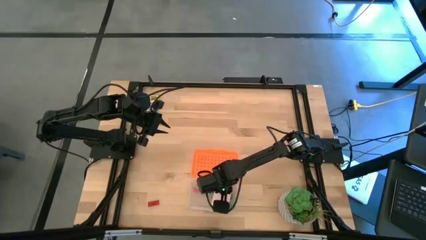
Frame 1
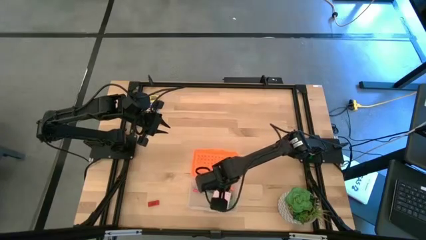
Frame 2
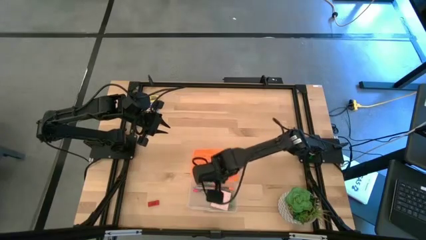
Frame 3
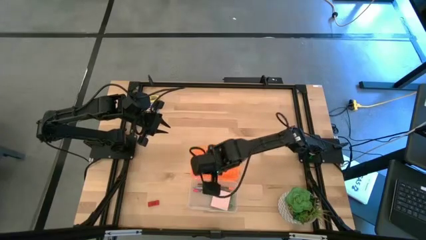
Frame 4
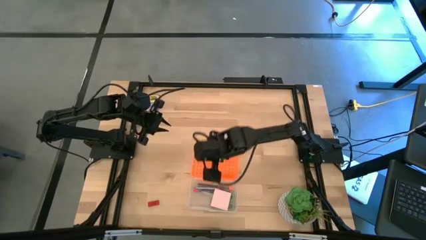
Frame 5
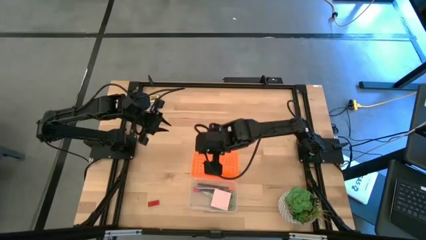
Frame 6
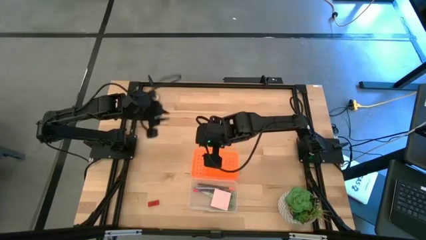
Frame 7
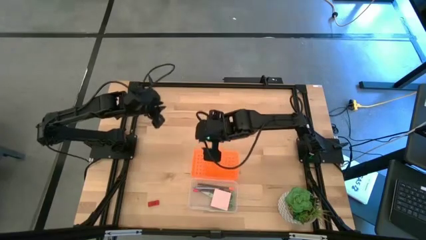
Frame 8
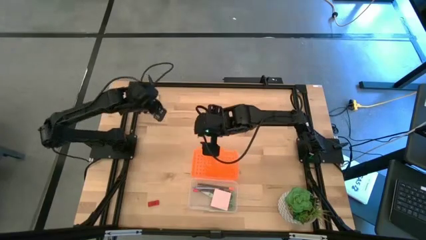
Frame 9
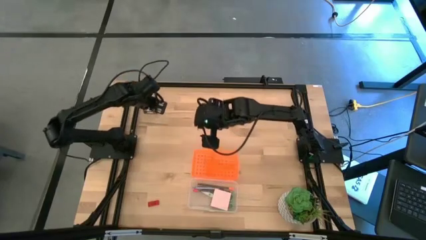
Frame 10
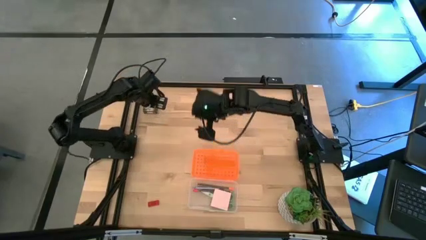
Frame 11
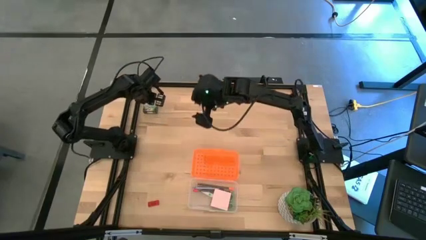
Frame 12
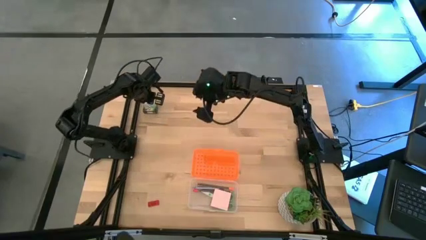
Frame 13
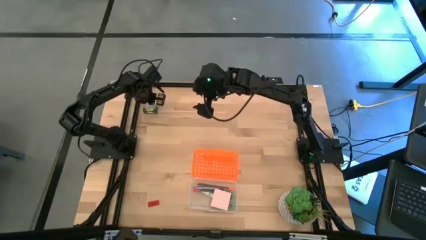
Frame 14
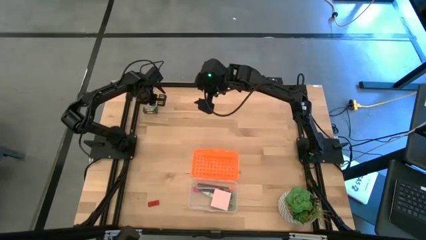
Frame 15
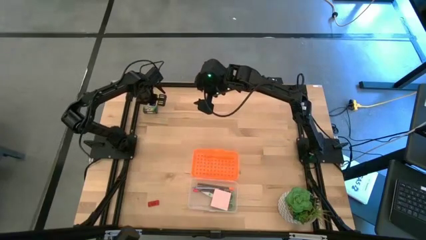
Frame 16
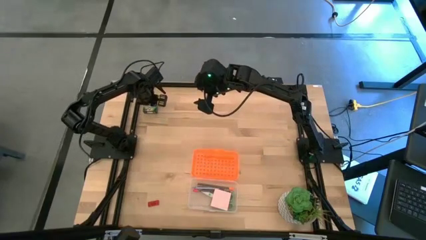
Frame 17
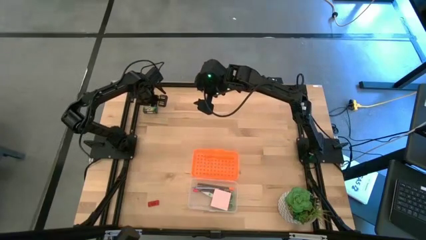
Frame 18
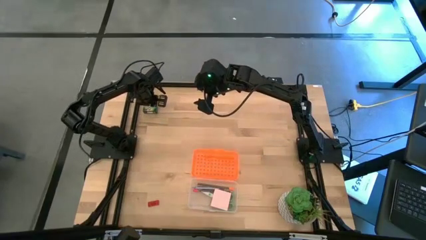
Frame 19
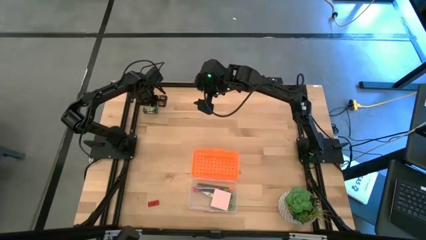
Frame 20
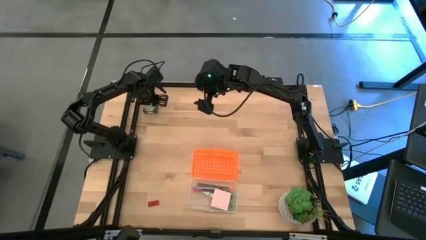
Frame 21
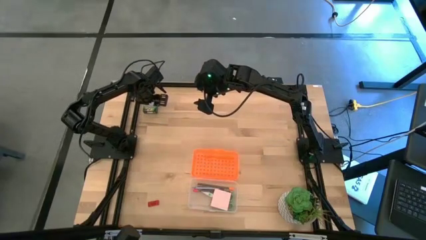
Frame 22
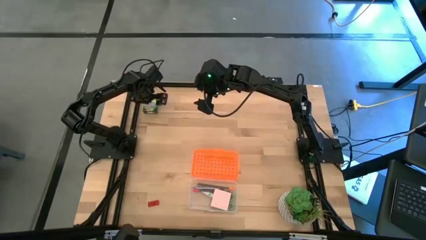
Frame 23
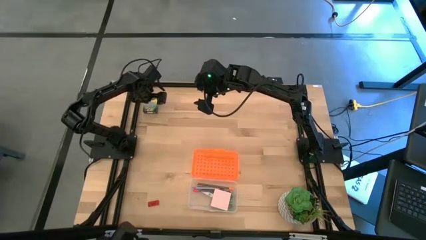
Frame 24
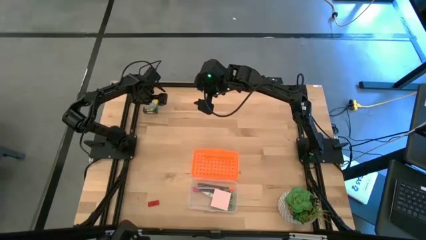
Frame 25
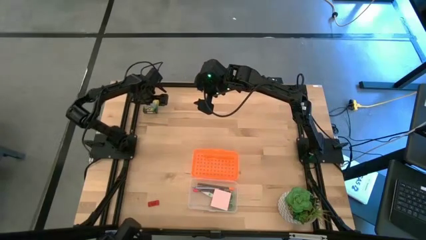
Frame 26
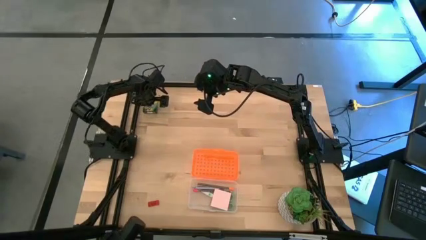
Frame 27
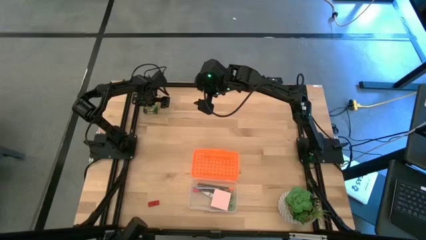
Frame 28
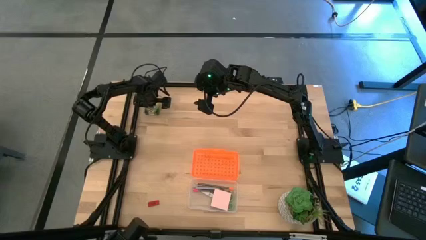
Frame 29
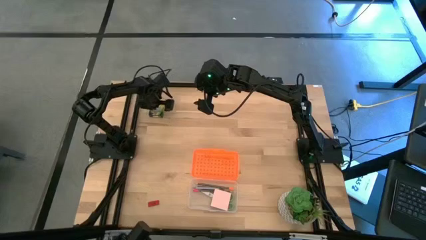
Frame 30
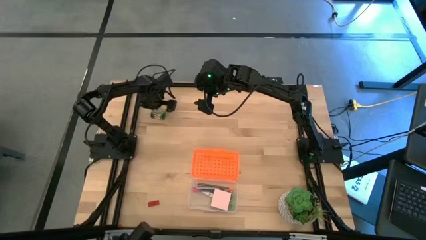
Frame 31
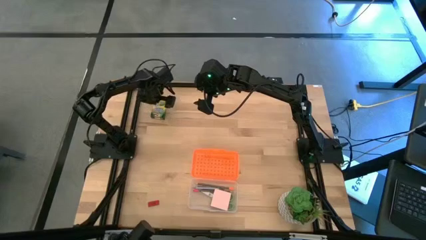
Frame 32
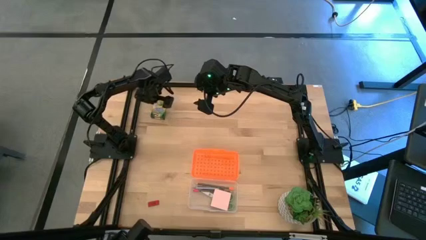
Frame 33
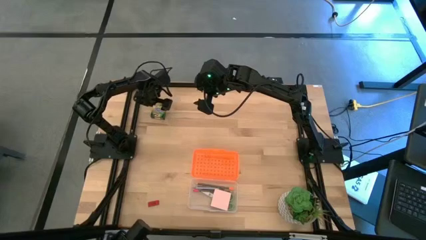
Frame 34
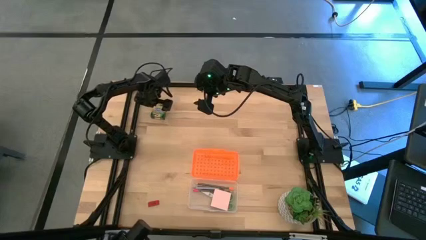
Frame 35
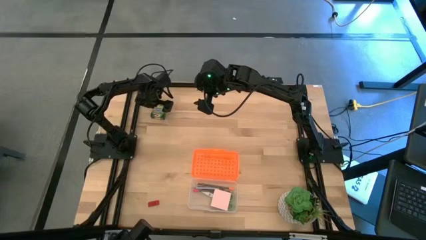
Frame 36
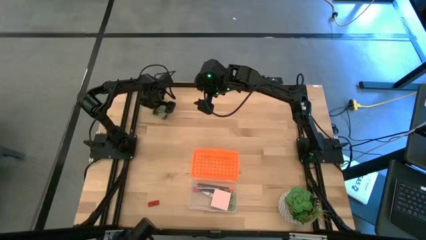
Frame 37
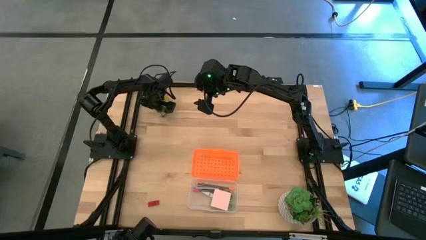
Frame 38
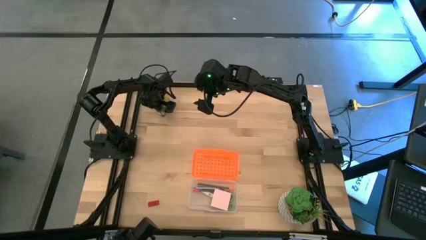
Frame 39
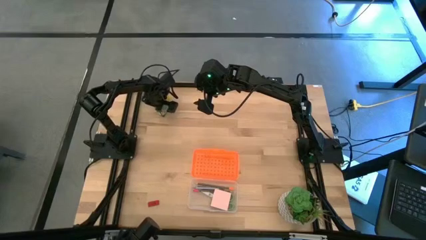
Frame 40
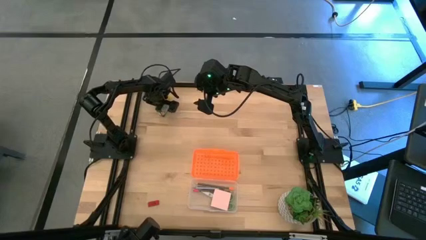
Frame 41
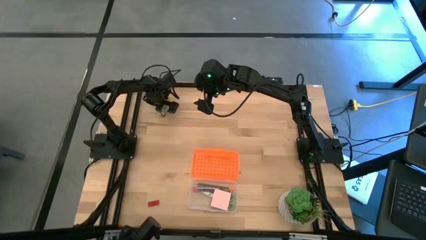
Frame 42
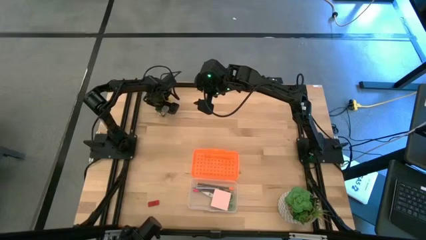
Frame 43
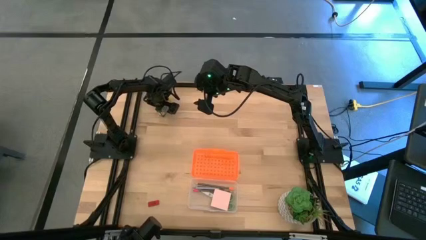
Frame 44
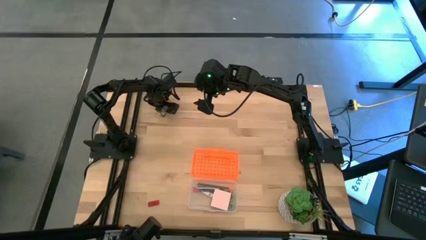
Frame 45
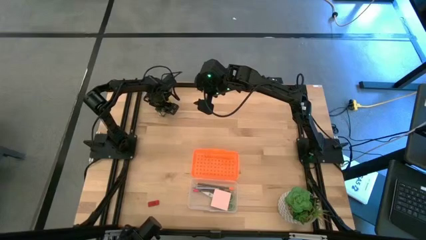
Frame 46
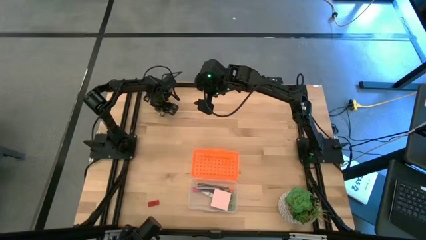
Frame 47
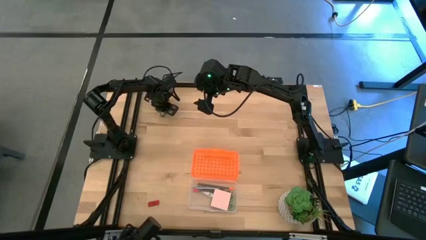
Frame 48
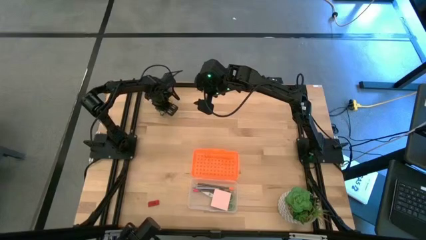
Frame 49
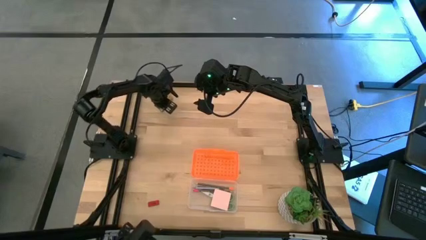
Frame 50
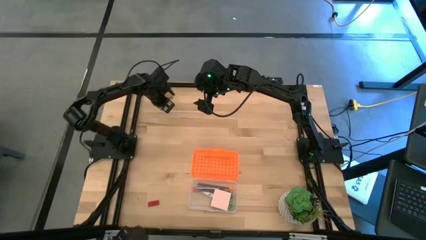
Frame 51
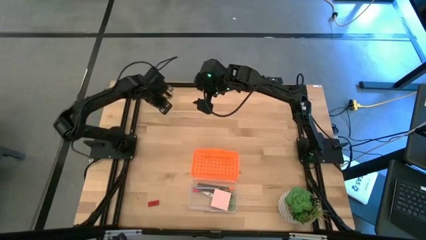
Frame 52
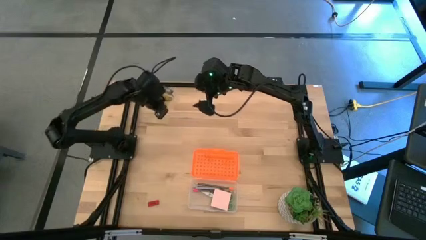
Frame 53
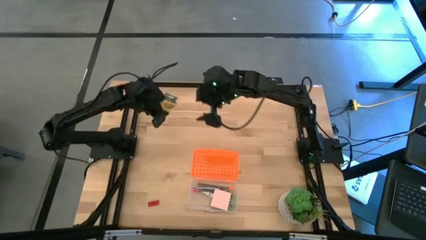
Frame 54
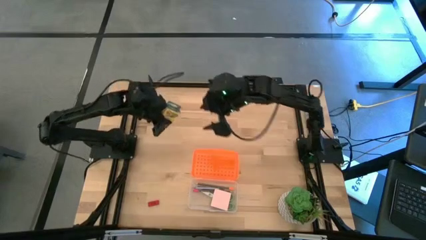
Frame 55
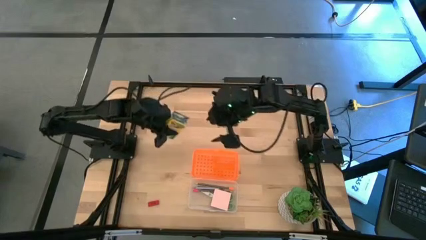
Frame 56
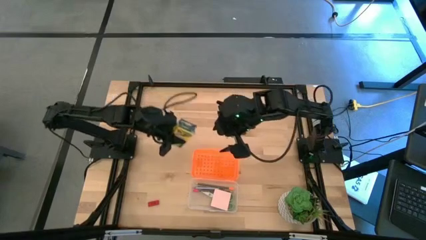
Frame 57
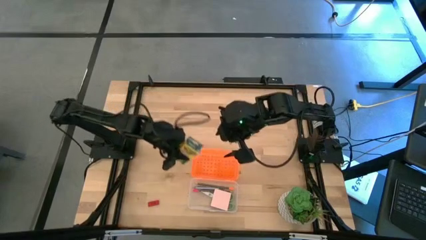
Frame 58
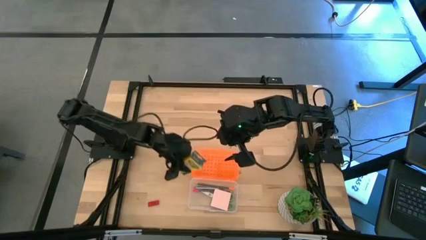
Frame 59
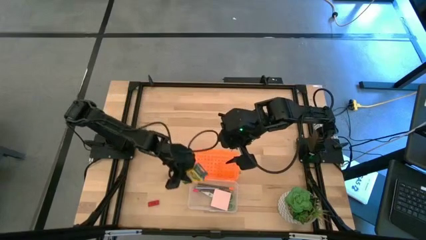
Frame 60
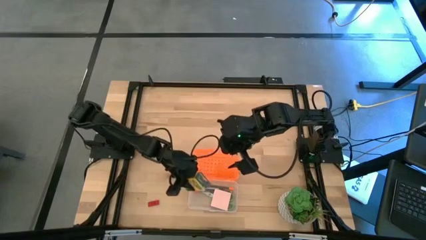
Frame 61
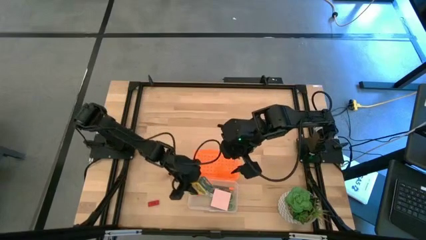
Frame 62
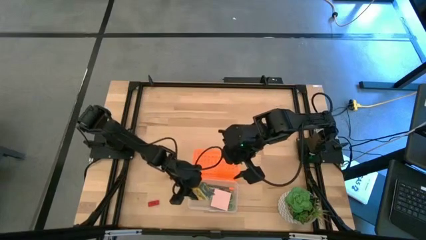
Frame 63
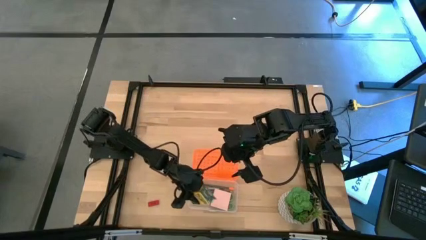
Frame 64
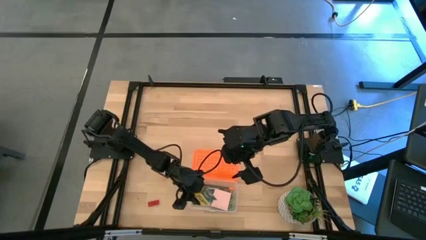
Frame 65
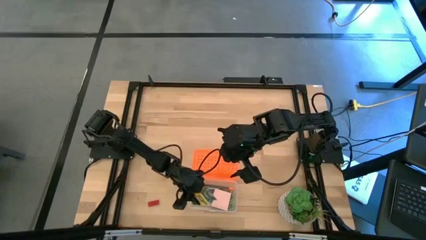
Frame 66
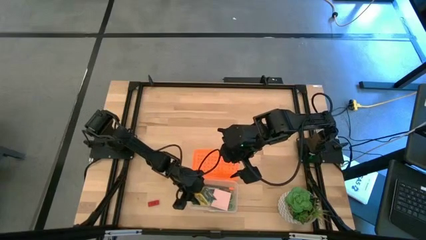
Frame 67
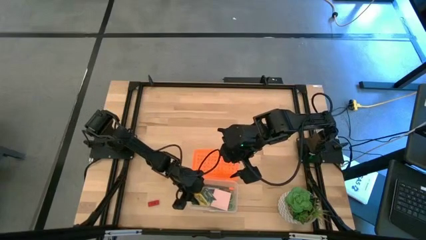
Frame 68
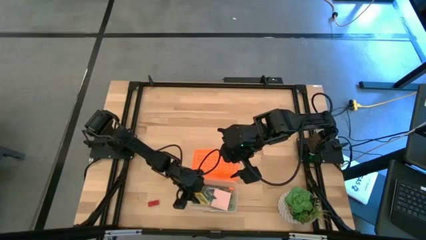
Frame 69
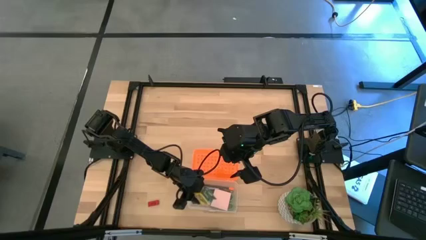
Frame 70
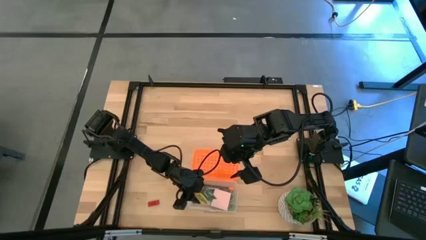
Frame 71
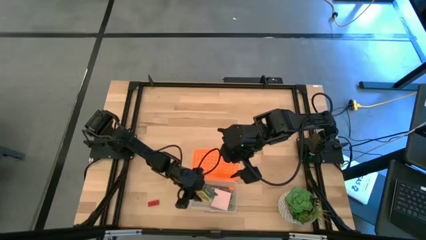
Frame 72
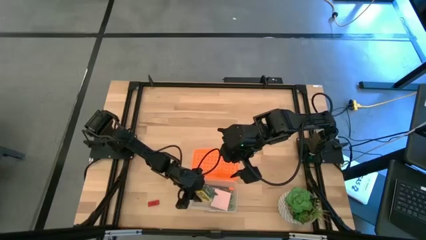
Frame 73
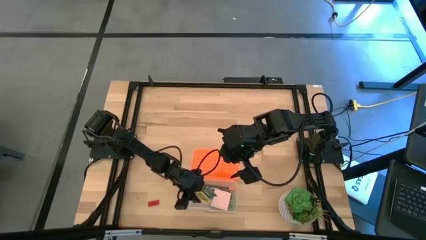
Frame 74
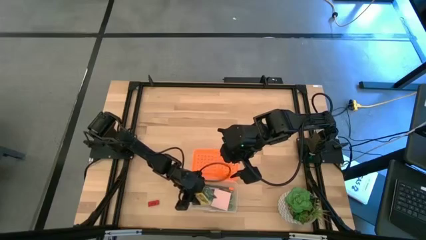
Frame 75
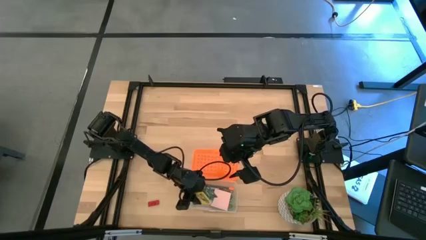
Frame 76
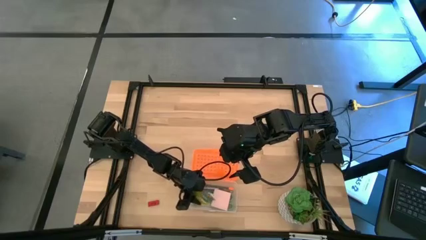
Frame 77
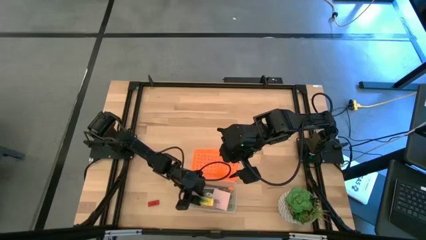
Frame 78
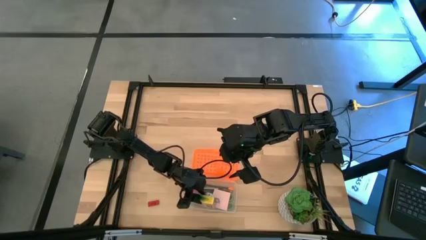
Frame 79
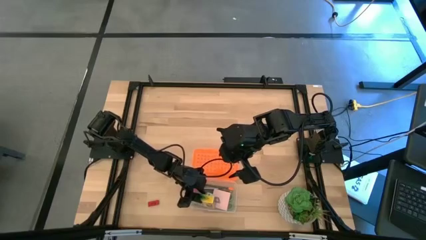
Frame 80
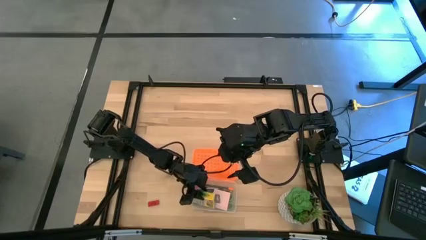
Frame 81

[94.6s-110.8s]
Task: Pack school essentials
Put the yellow crayon box into the orange supply box
